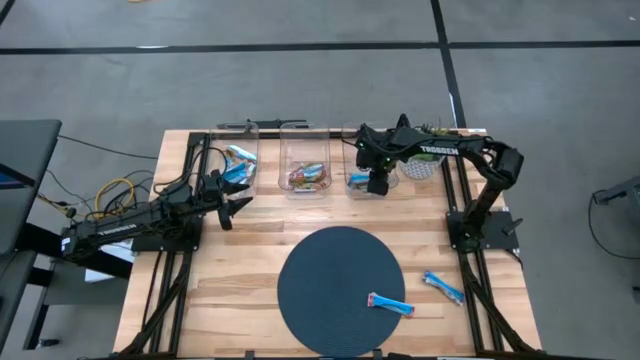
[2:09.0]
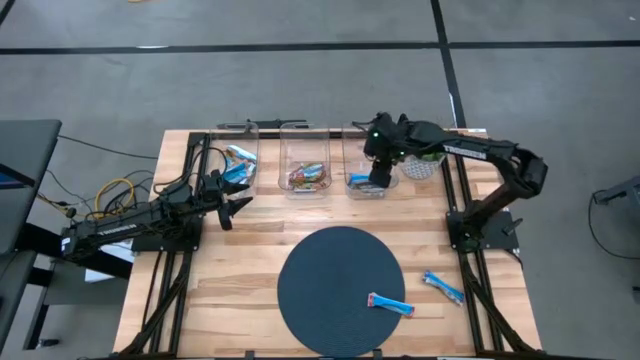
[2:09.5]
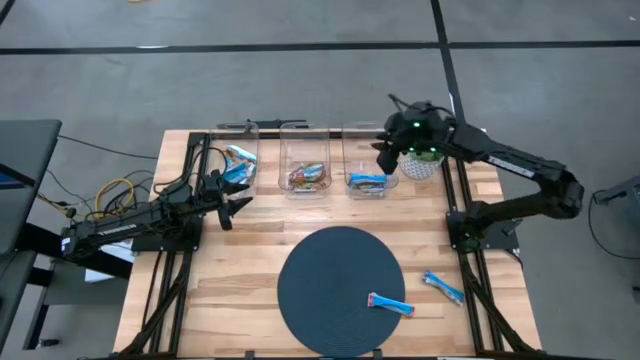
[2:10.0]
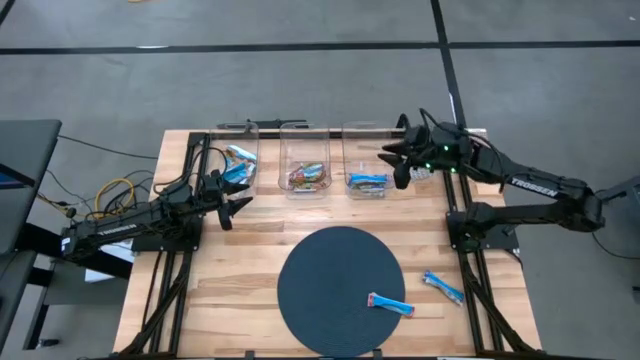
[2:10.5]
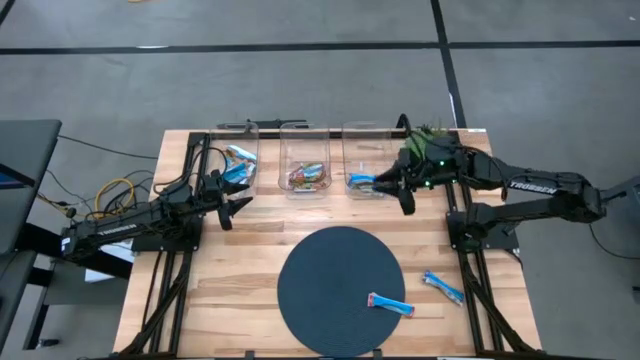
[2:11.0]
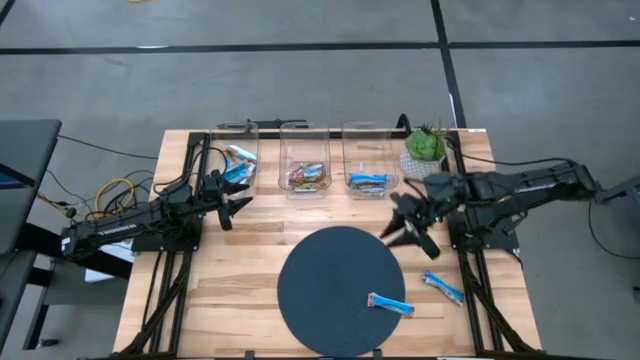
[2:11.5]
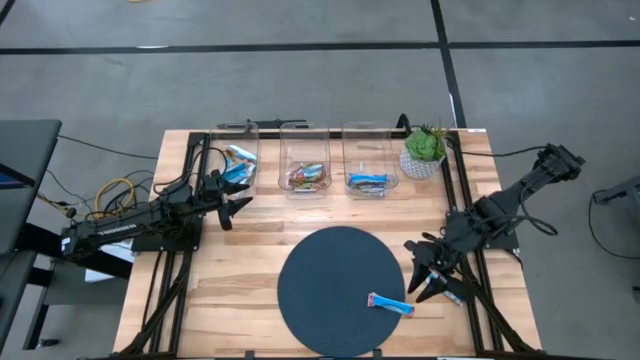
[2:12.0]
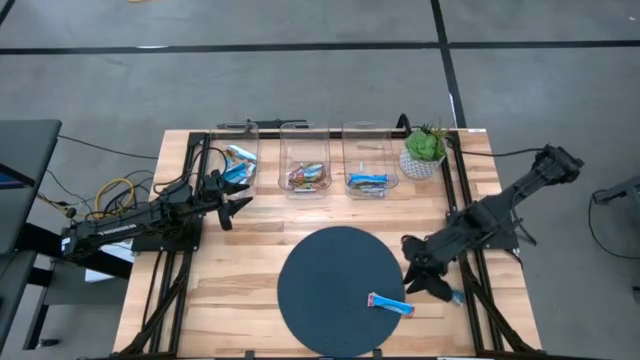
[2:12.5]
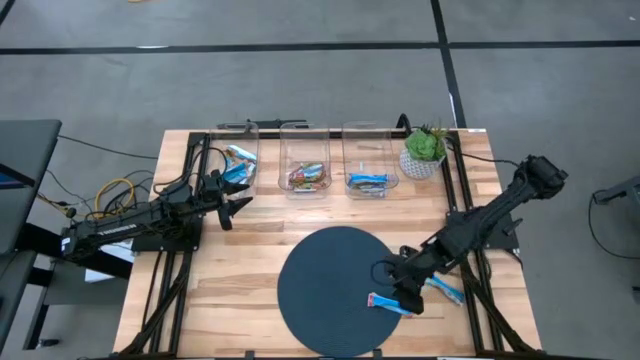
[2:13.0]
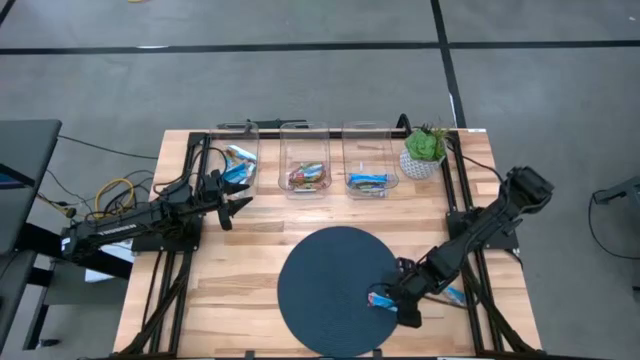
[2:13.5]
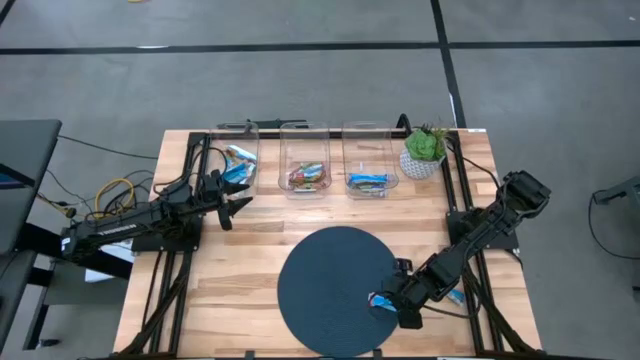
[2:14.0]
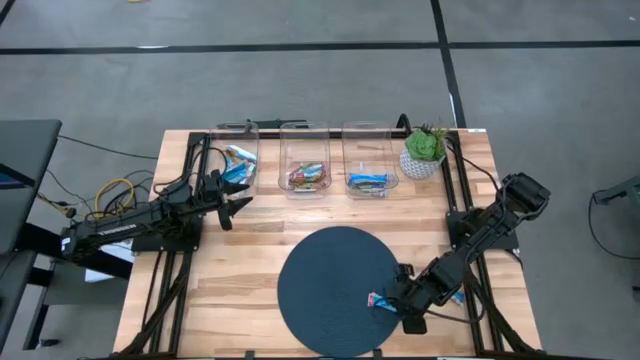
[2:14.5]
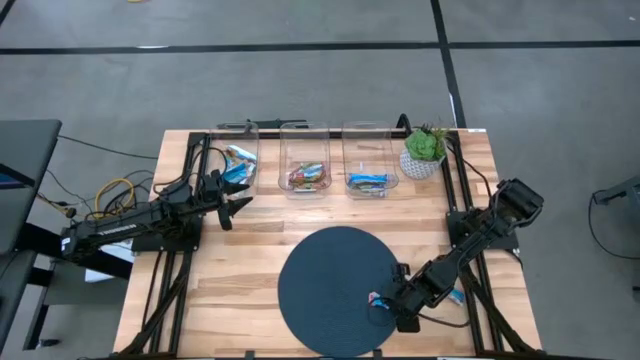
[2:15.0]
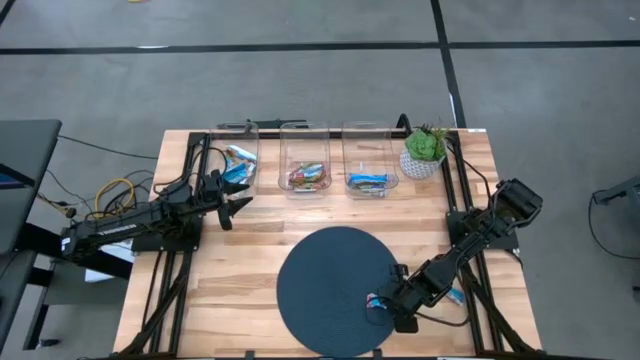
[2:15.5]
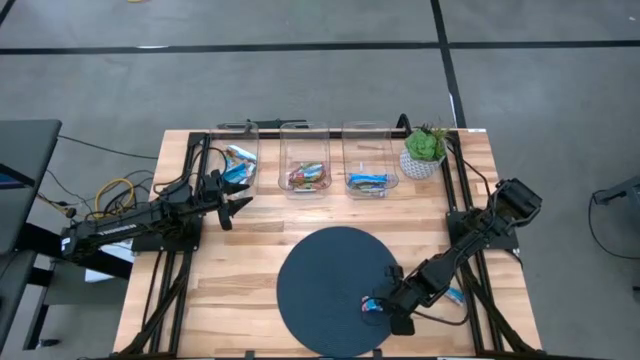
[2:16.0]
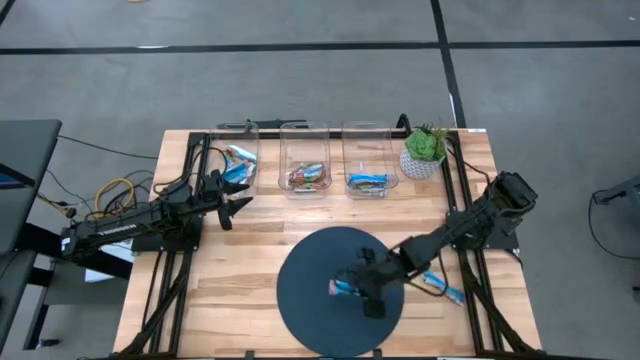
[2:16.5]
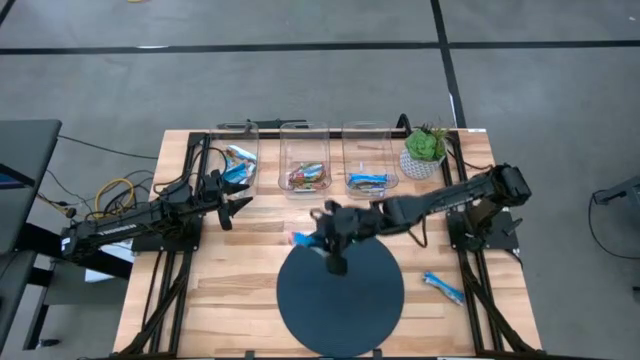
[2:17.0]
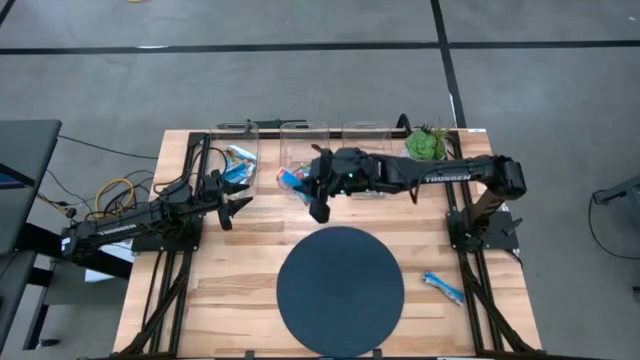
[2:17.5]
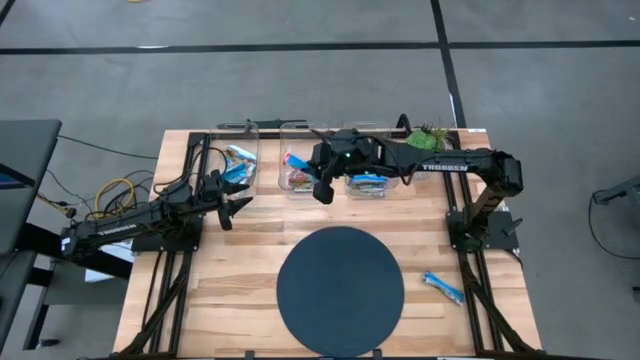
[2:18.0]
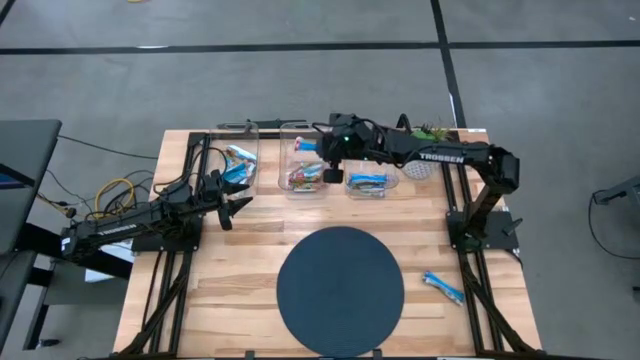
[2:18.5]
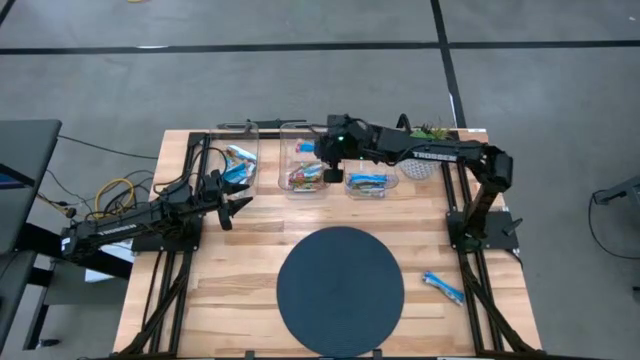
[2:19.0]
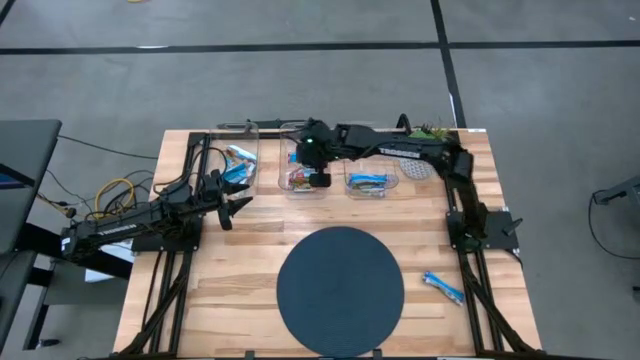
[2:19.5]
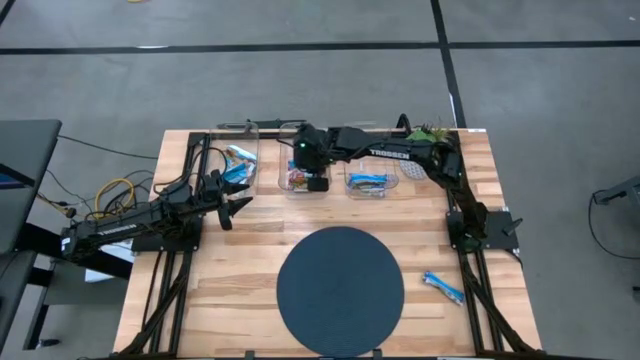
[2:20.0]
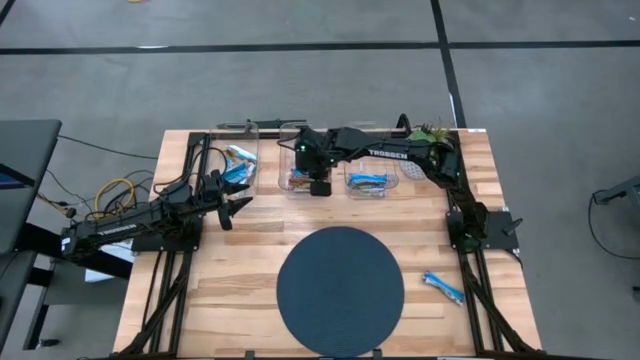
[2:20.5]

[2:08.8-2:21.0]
Task: Pick and place Granola Bars by type
Put the red granola bar into the middle transparent bin

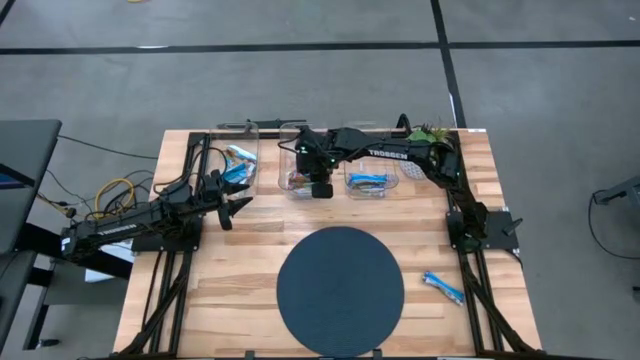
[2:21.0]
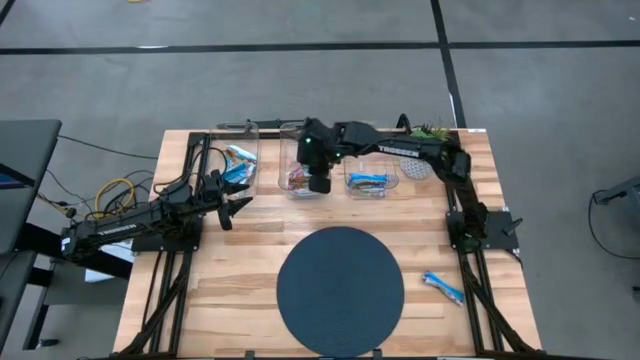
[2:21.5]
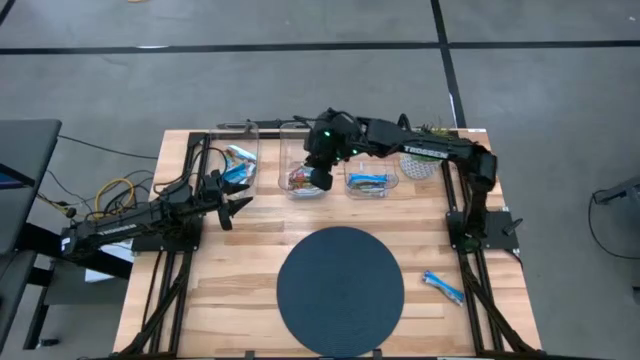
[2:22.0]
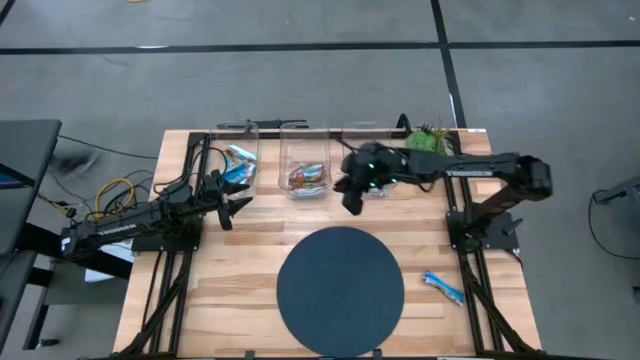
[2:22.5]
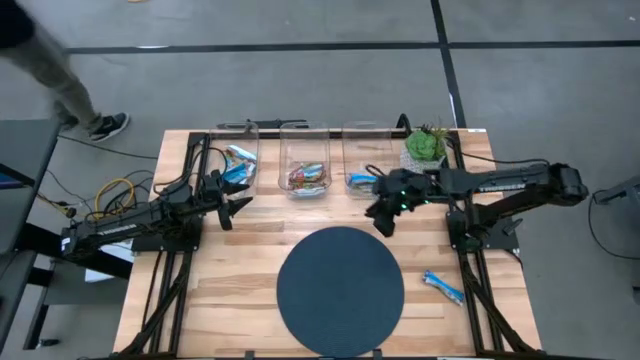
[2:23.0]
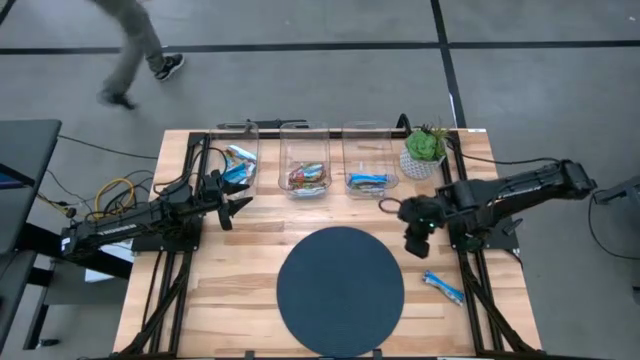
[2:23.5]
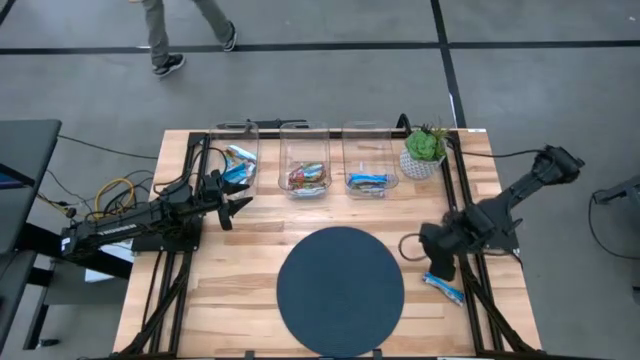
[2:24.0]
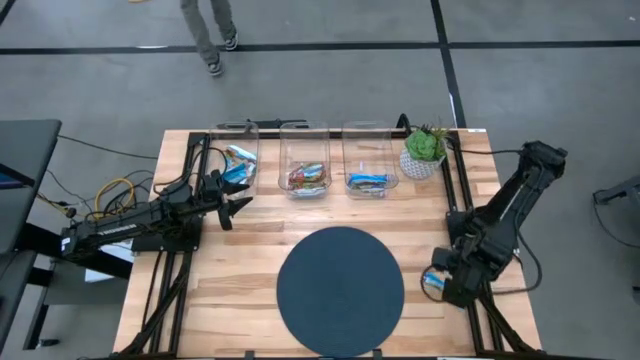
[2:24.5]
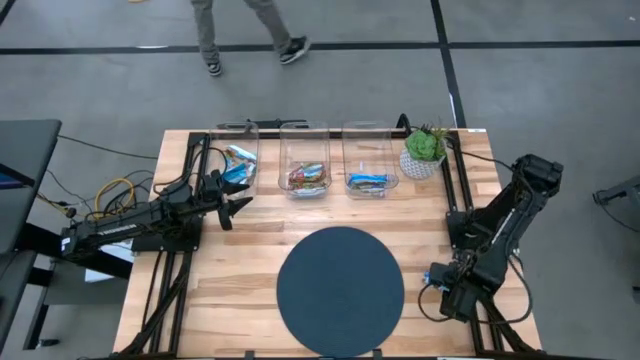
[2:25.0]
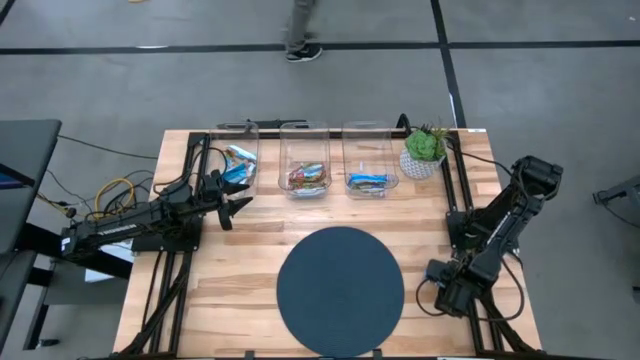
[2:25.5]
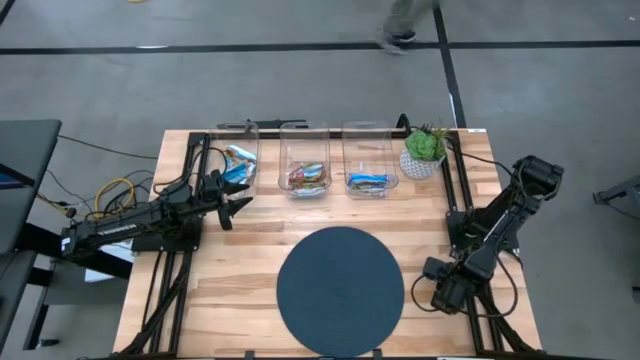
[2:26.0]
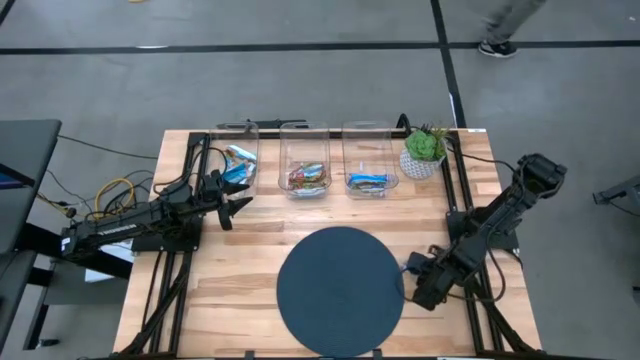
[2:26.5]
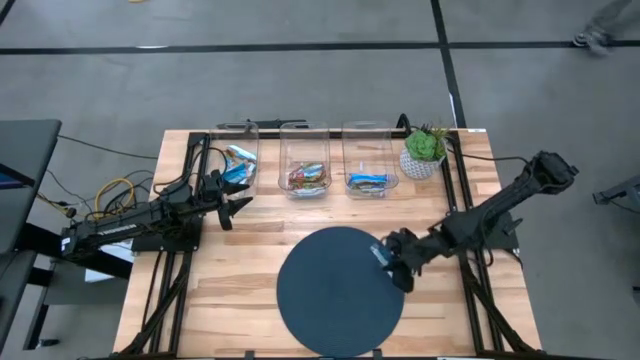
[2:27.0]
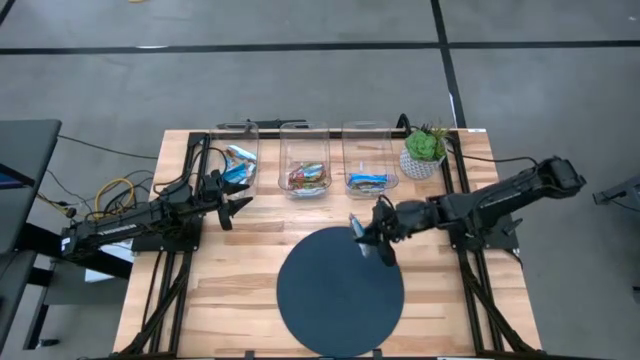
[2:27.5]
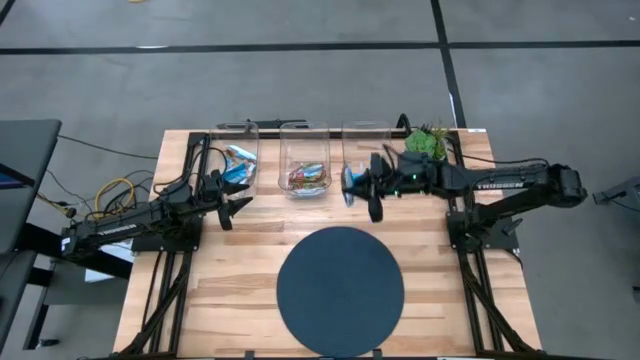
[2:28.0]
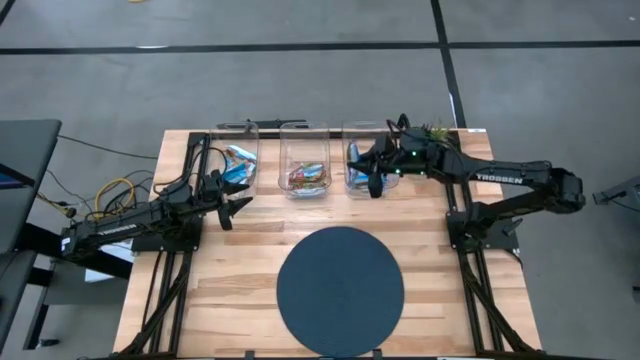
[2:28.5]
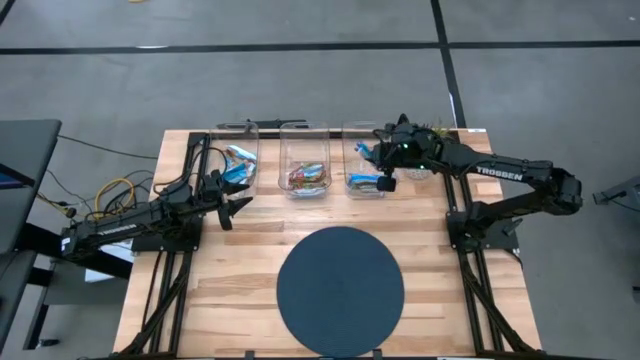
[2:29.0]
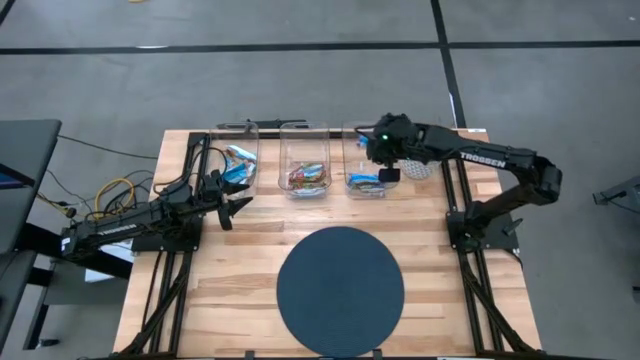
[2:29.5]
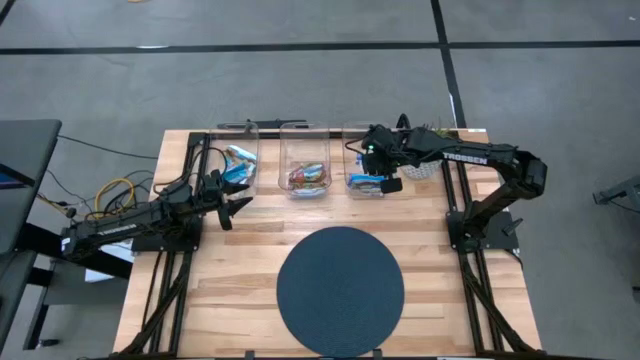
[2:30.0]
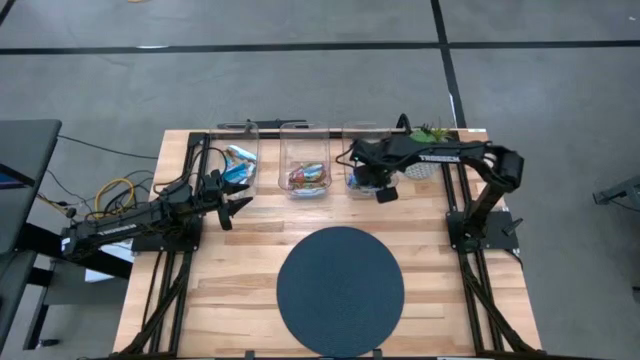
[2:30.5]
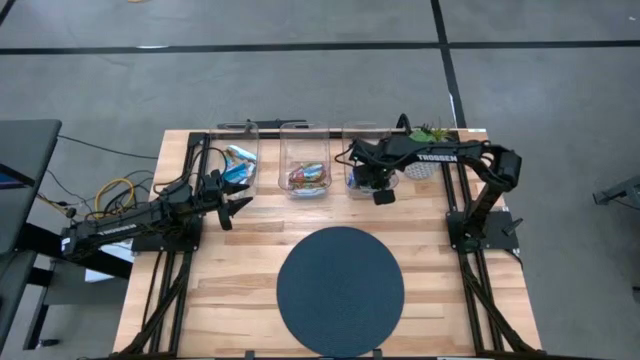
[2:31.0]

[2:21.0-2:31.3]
Put the blue granola bar into the right transparent bin
